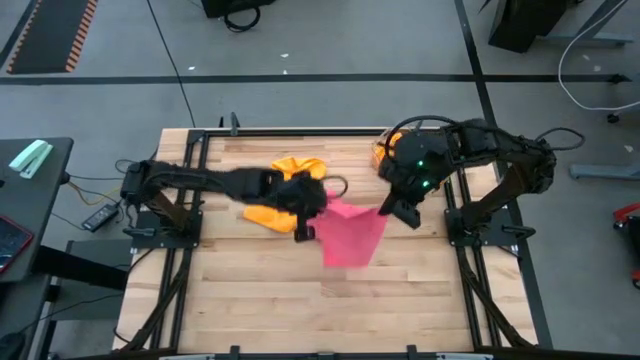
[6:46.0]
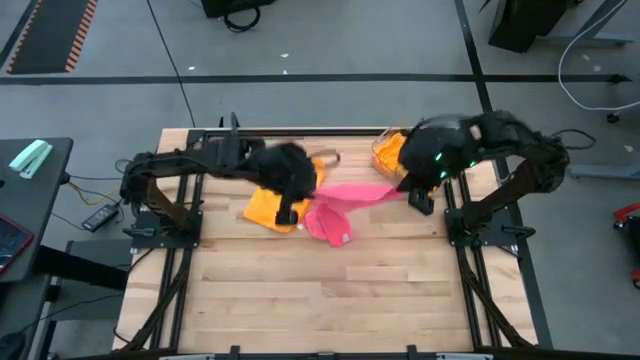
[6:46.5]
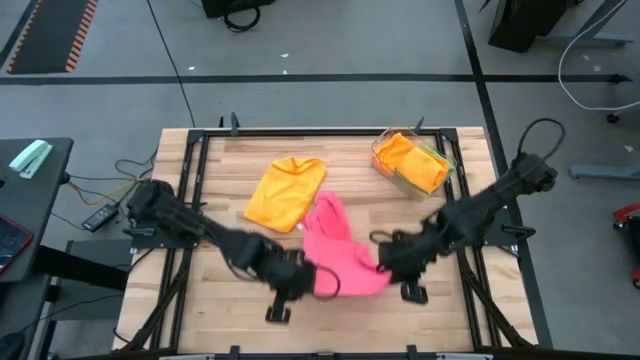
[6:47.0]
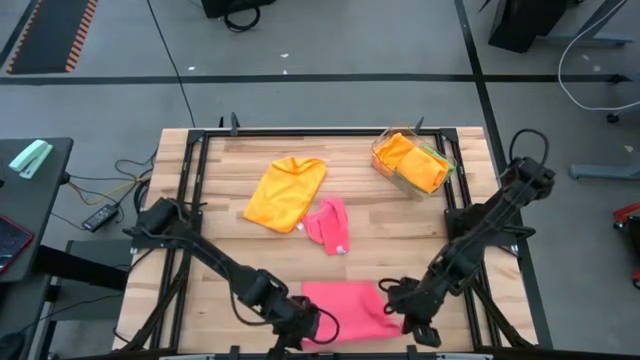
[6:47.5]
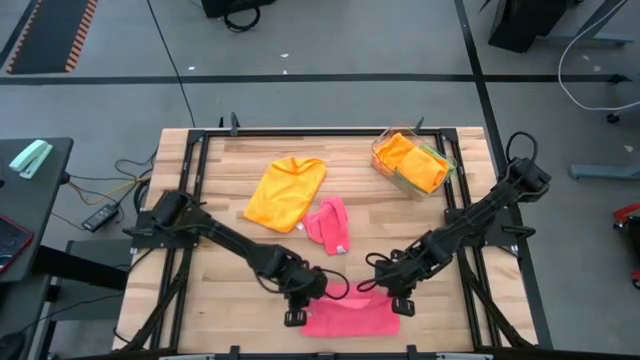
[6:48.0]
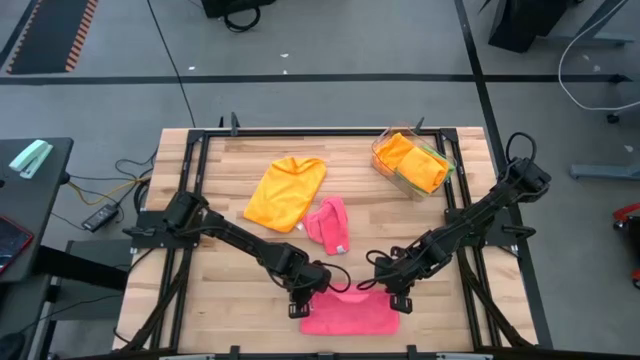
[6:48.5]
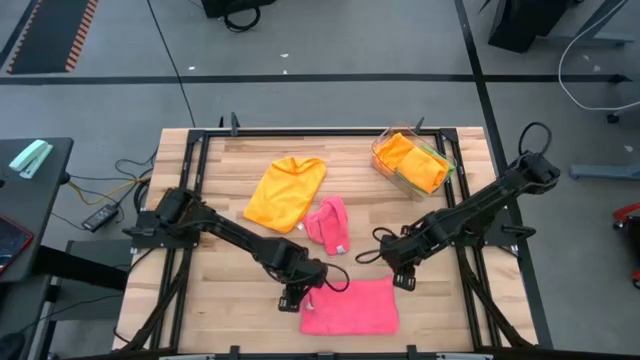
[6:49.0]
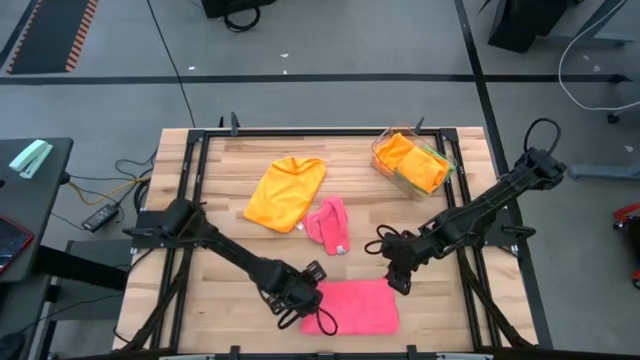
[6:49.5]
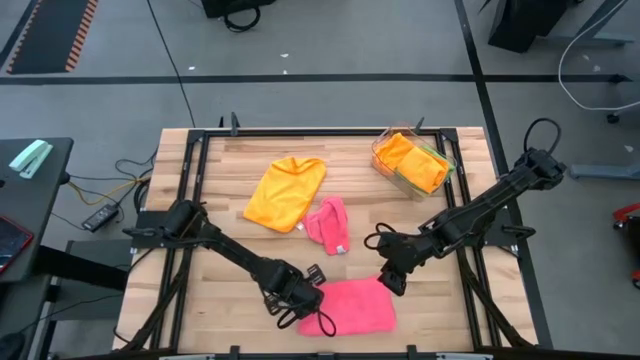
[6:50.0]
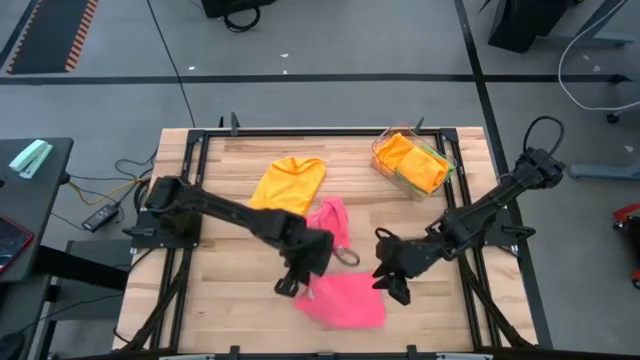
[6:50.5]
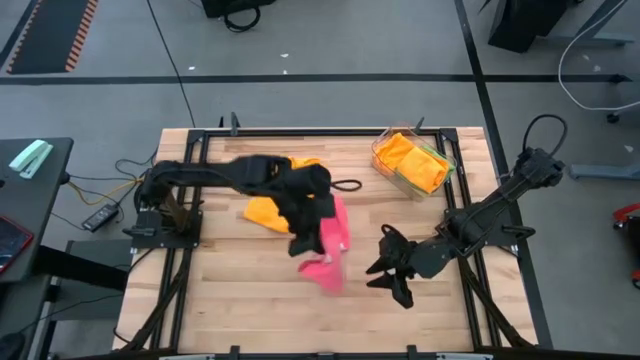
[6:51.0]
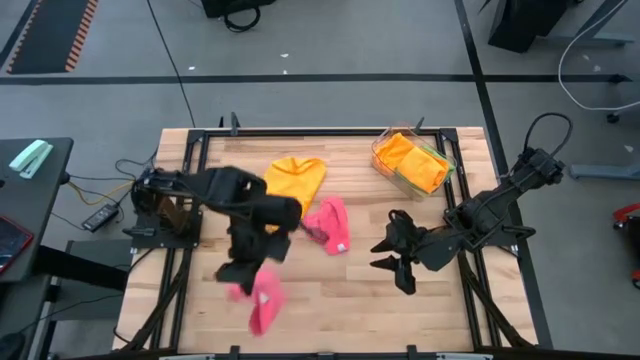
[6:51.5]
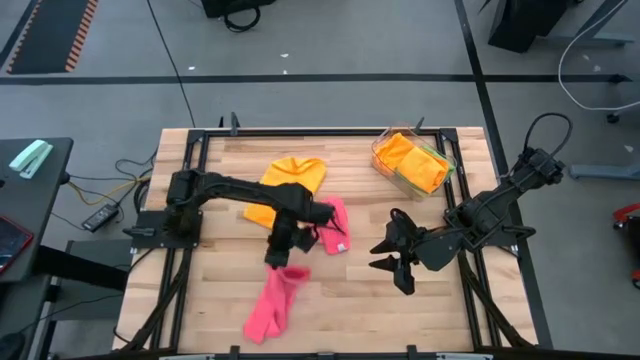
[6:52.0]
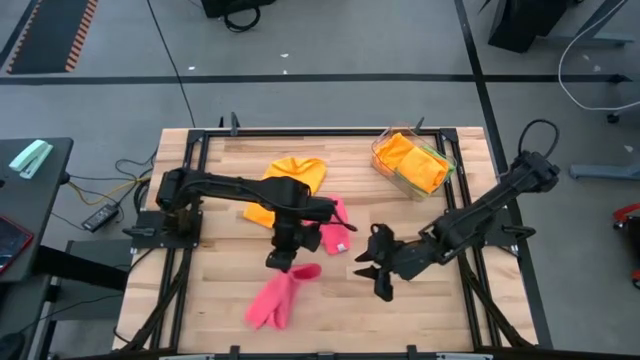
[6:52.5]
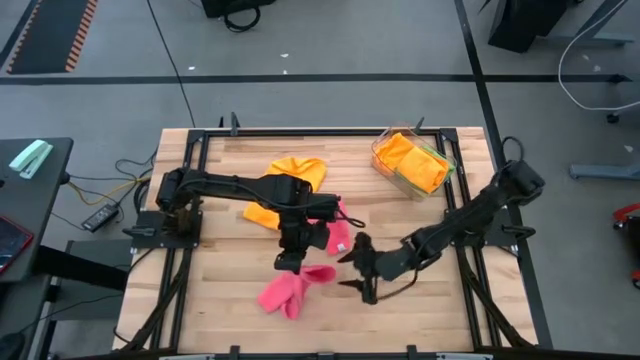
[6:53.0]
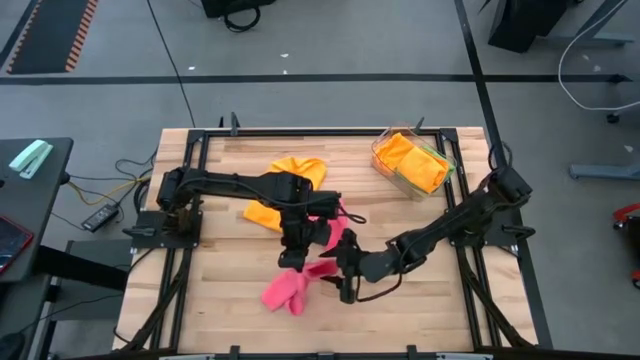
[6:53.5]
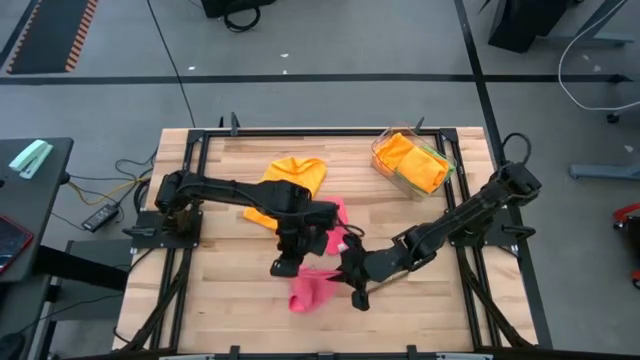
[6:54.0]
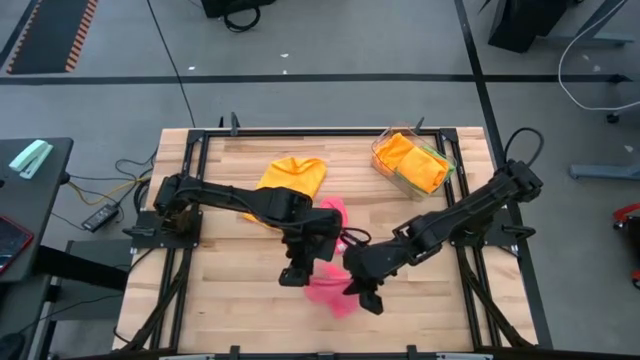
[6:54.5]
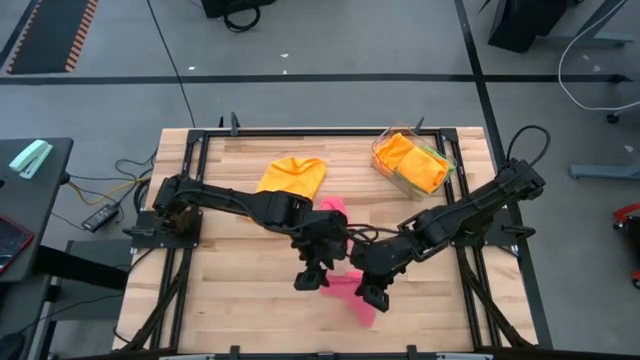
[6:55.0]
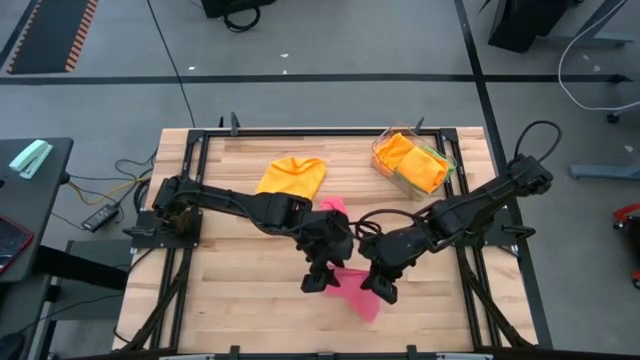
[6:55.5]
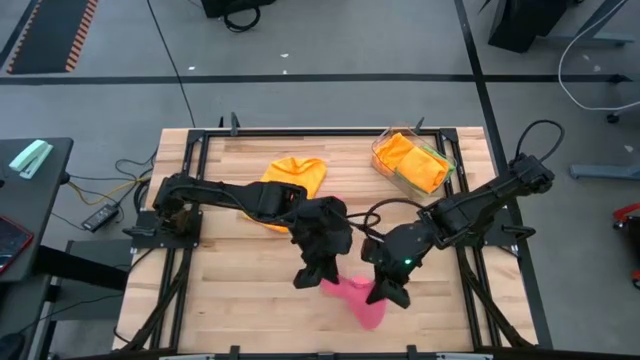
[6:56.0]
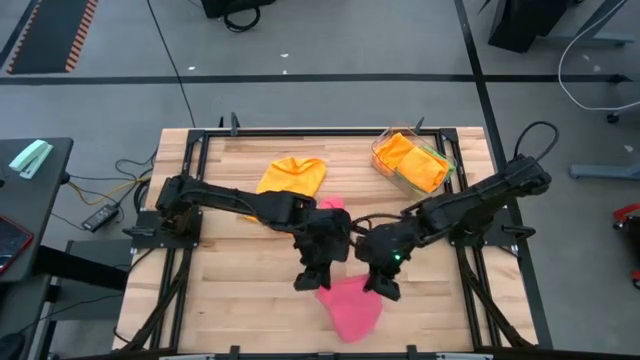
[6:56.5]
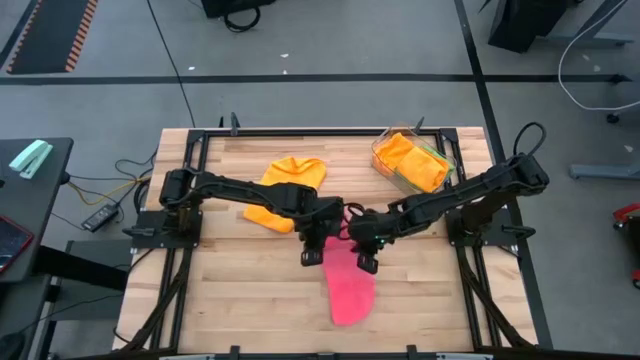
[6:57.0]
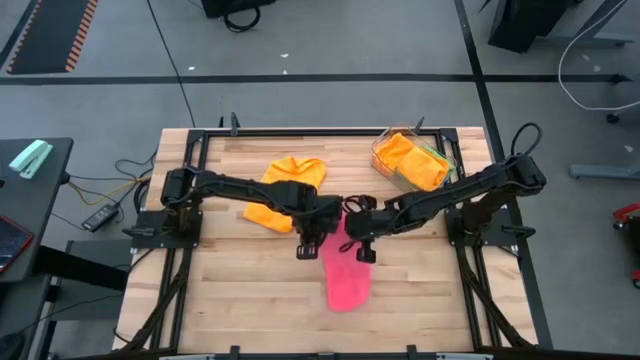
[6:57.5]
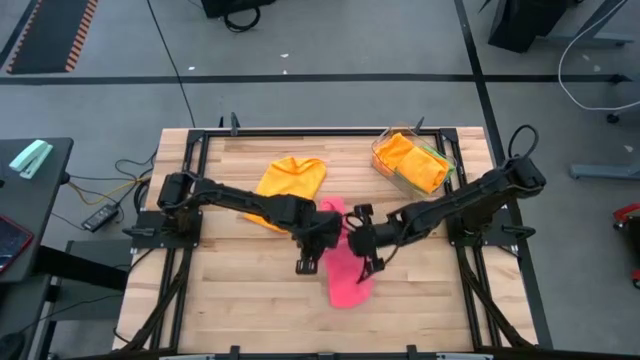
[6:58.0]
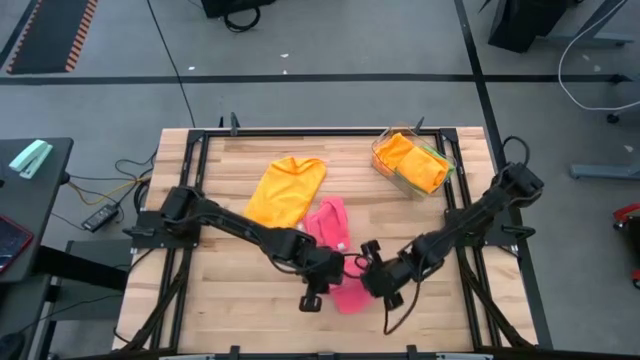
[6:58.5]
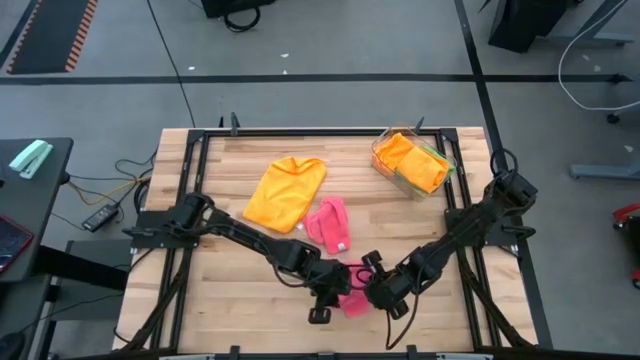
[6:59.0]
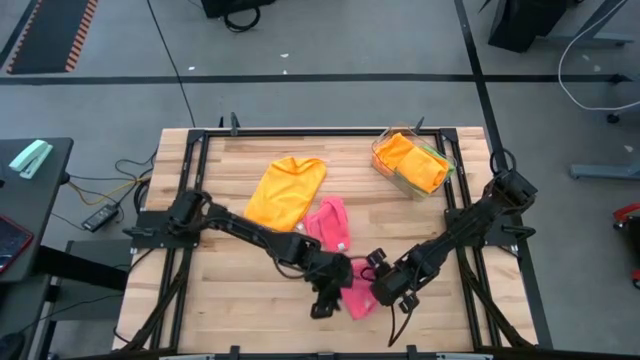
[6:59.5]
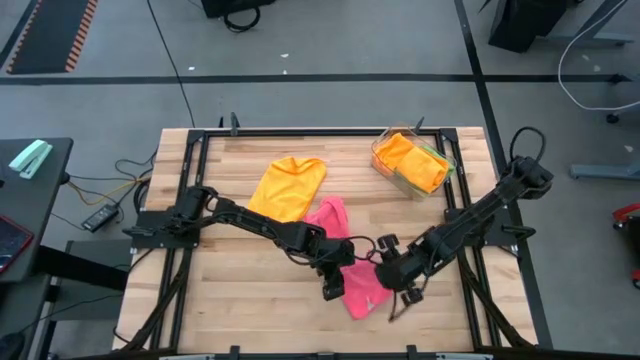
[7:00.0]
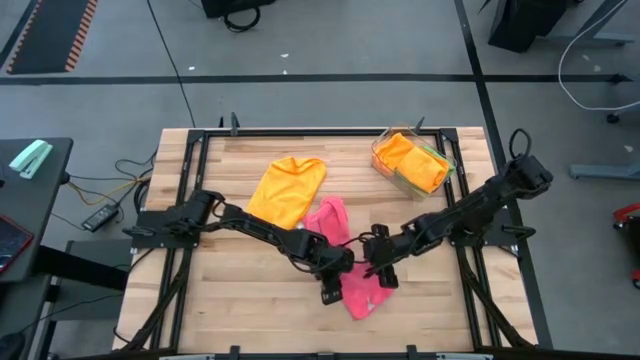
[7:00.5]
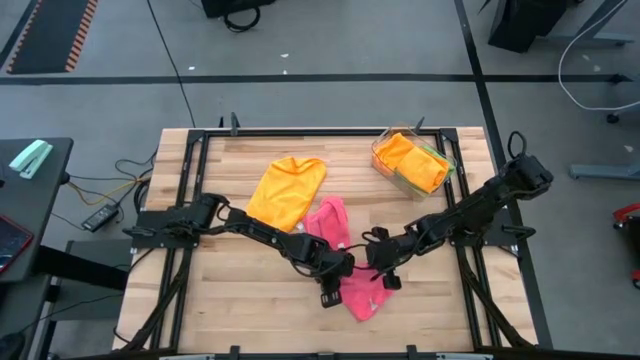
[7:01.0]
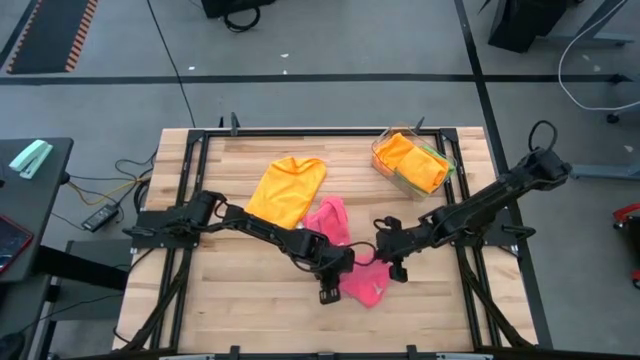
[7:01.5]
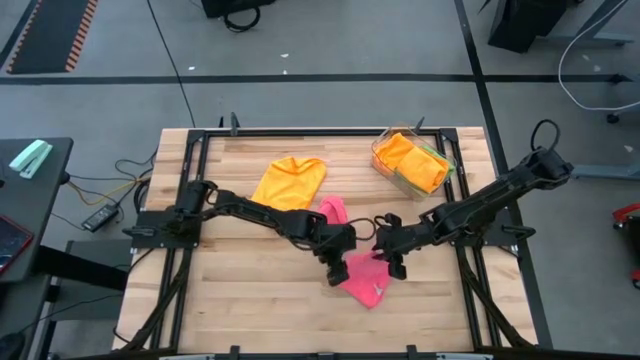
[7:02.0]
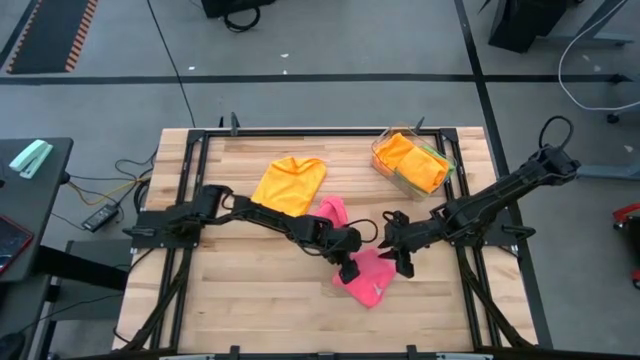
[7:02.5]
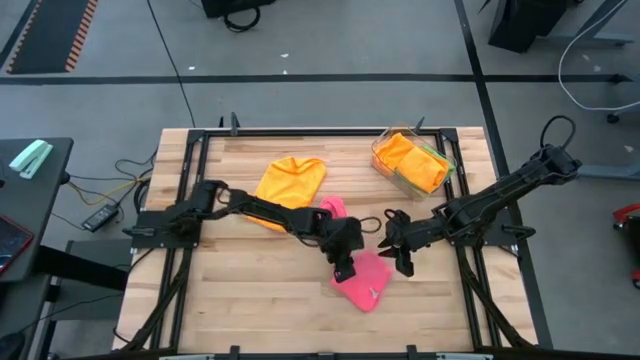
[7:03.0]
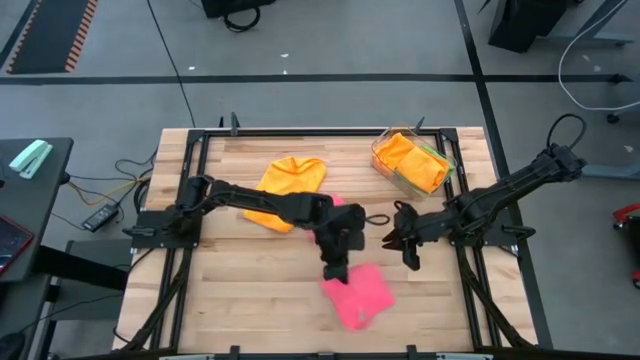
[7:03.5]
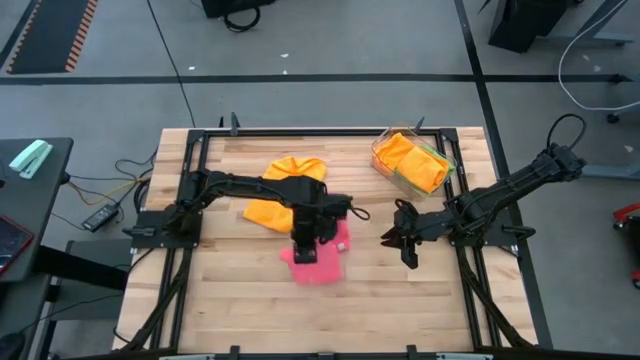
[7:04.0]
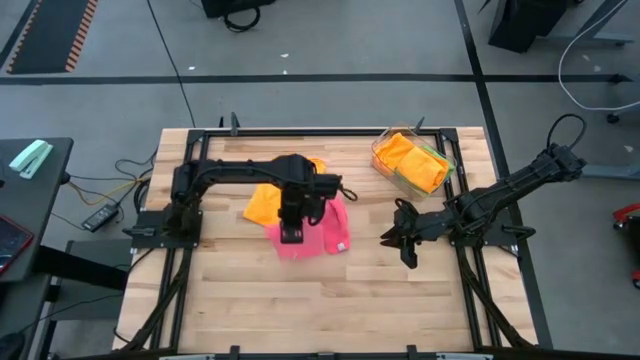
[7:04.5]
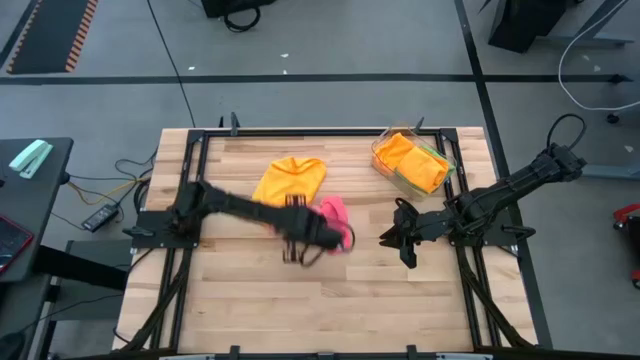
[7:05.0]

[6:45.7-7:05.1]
Task: Fold microfiber towels
Fold the left pink towel

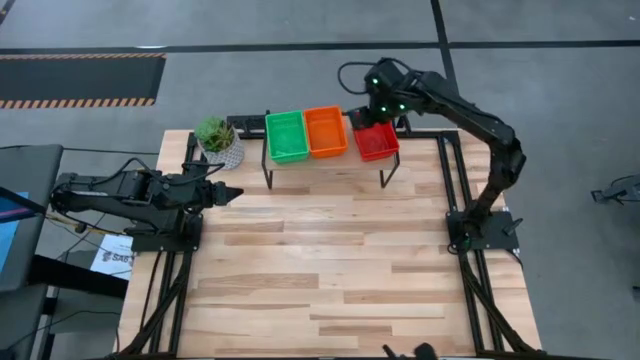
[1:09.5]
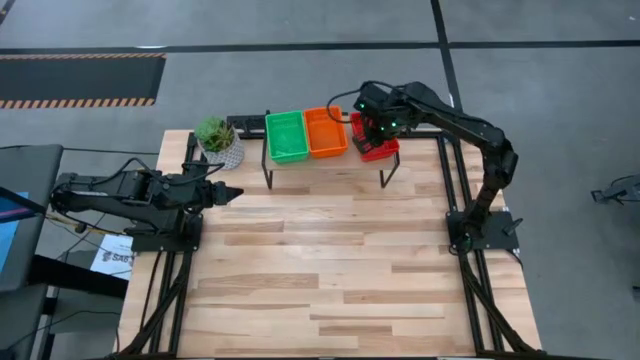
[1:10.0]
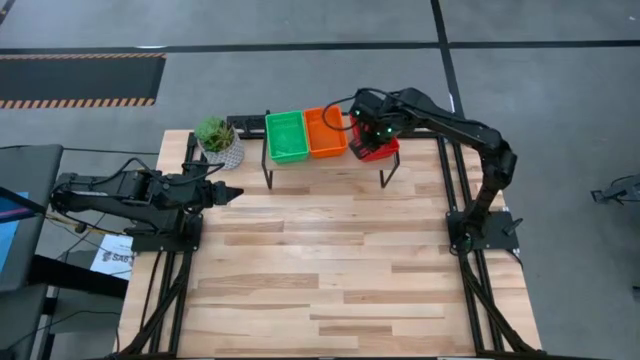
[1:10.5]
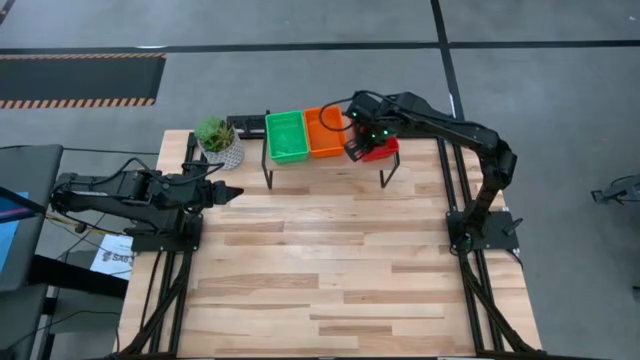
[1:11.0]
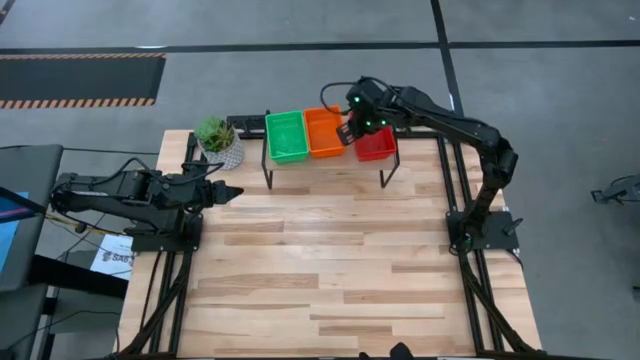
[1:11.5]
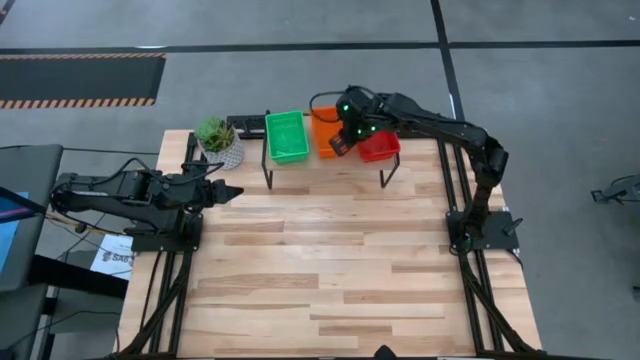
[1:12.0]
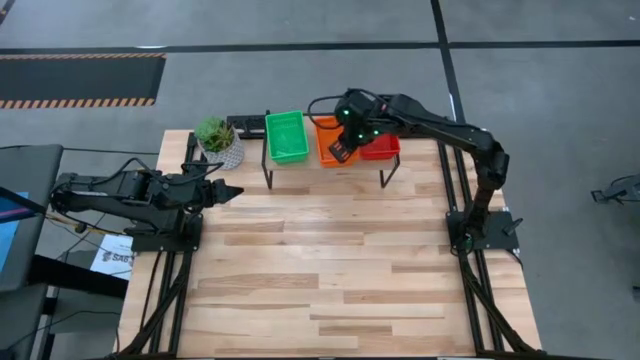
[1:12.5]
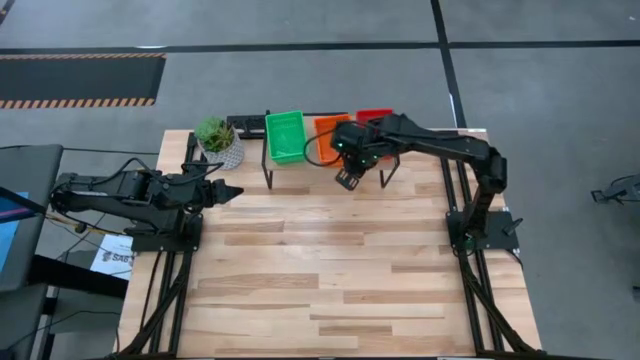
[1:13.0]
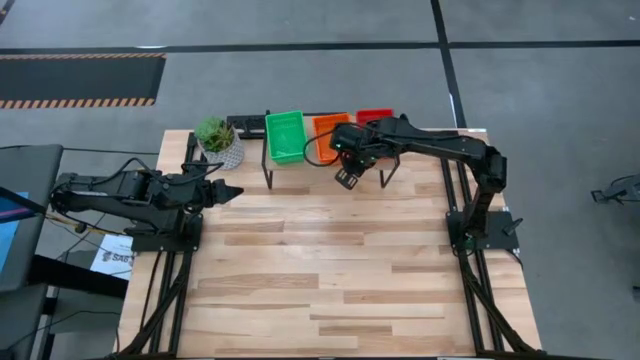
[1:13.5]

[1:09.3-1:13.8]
Task: Stack baskets on shelf by color
Adjust the stacked bins on the shelf
